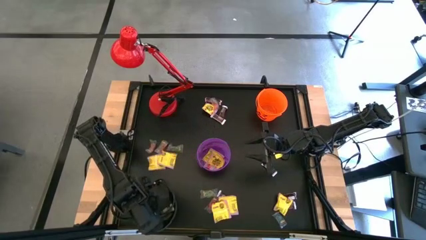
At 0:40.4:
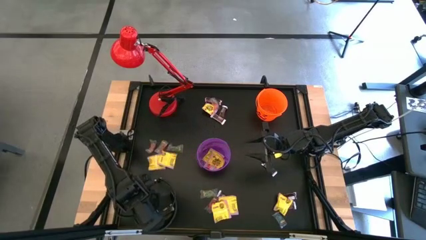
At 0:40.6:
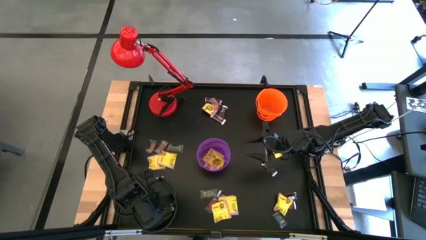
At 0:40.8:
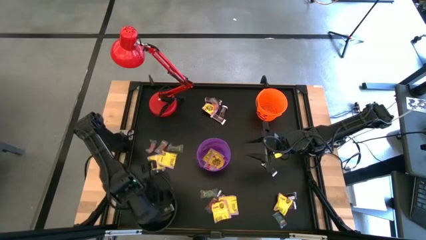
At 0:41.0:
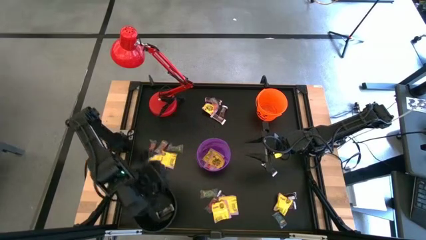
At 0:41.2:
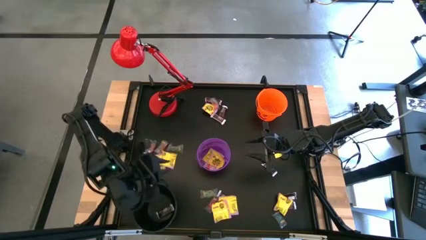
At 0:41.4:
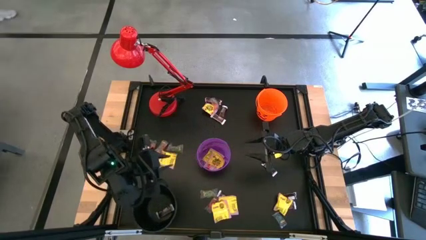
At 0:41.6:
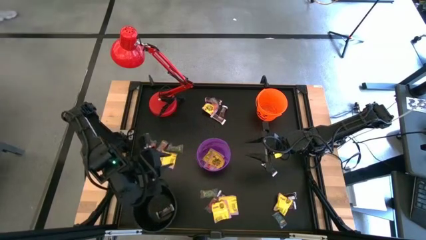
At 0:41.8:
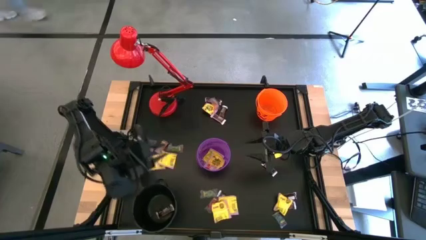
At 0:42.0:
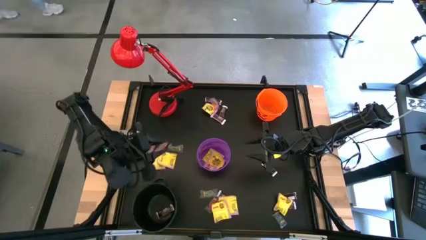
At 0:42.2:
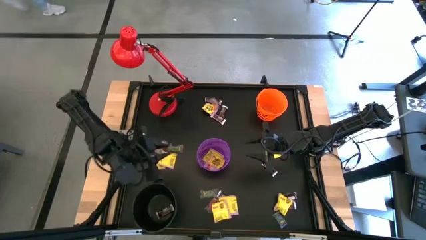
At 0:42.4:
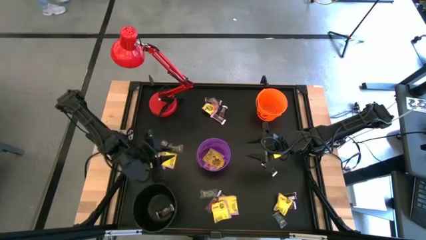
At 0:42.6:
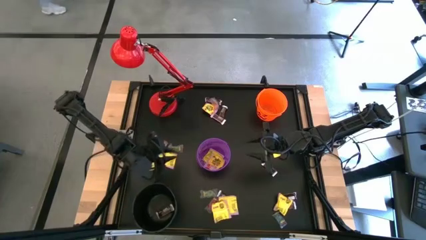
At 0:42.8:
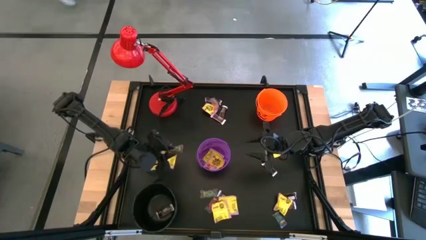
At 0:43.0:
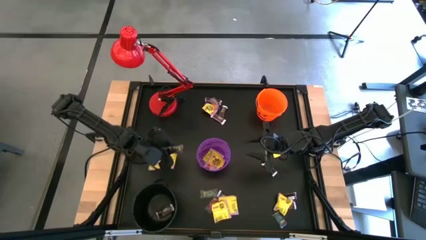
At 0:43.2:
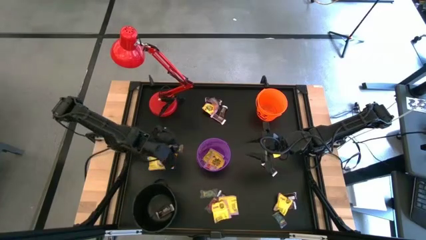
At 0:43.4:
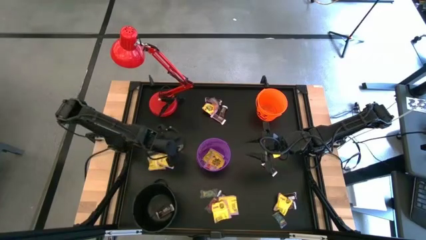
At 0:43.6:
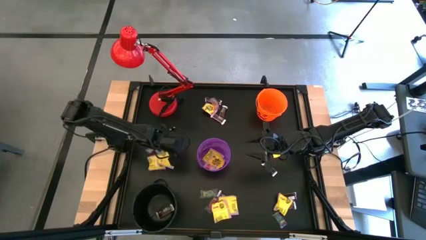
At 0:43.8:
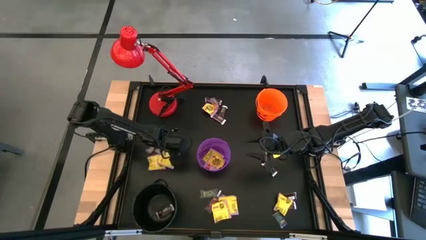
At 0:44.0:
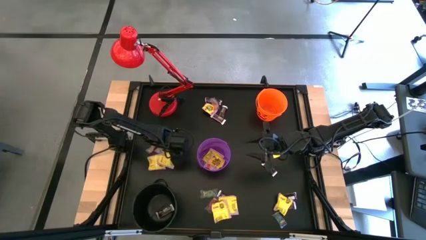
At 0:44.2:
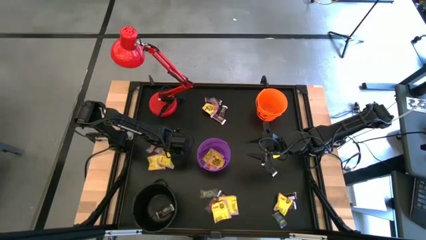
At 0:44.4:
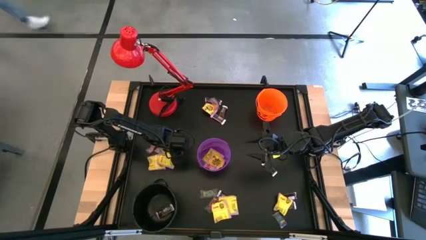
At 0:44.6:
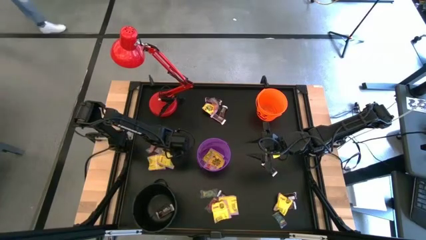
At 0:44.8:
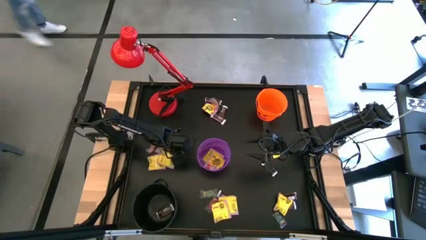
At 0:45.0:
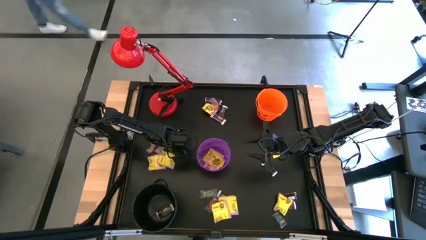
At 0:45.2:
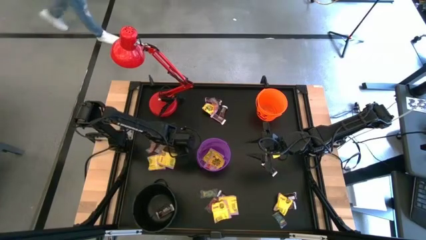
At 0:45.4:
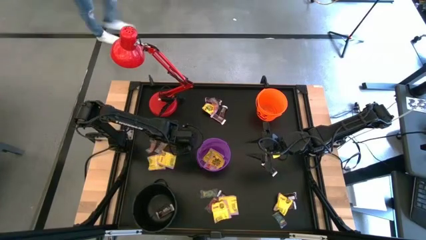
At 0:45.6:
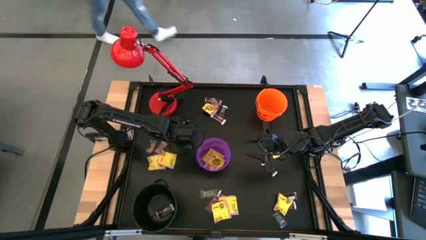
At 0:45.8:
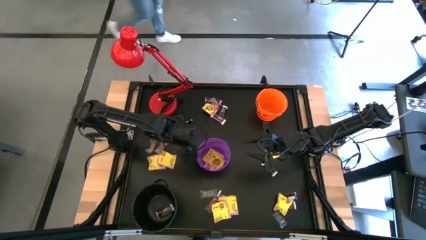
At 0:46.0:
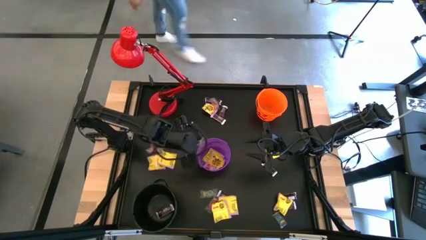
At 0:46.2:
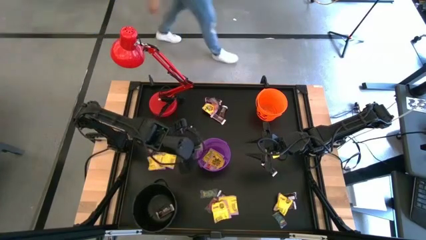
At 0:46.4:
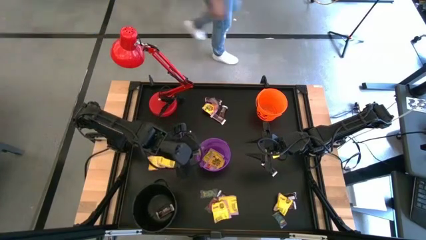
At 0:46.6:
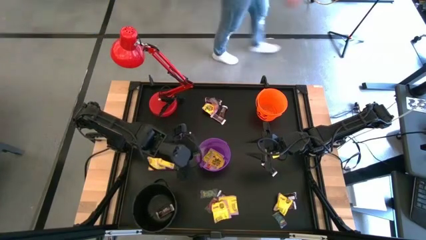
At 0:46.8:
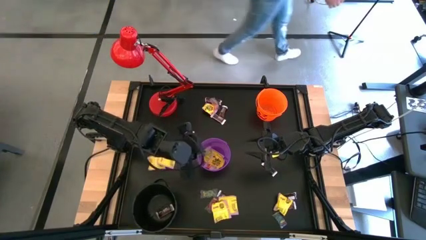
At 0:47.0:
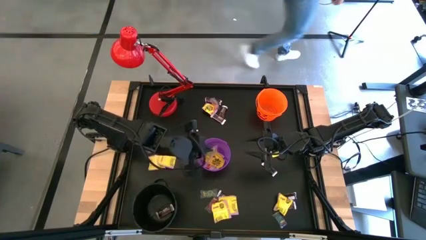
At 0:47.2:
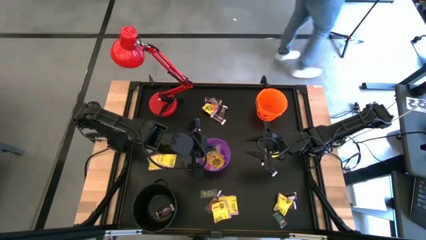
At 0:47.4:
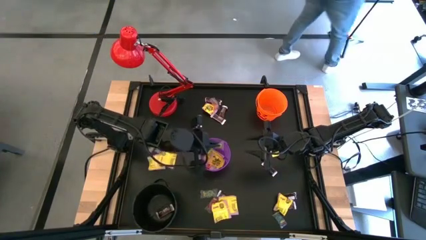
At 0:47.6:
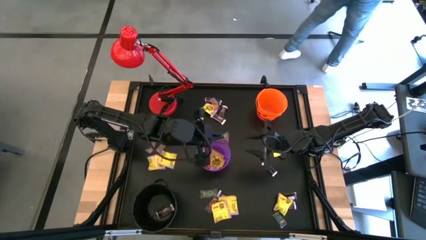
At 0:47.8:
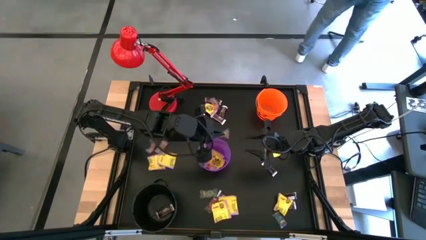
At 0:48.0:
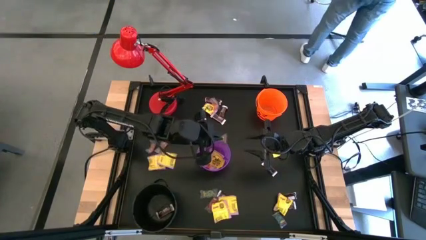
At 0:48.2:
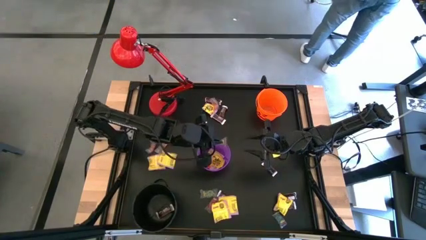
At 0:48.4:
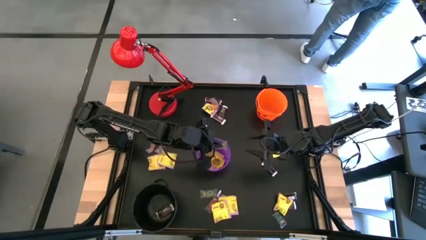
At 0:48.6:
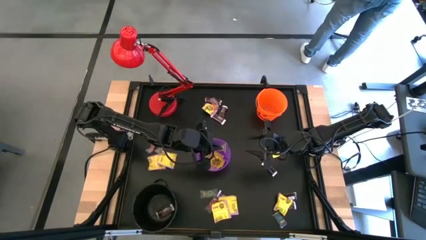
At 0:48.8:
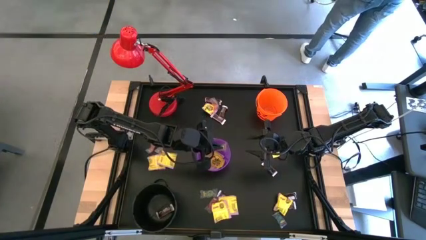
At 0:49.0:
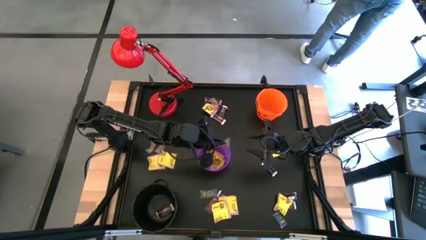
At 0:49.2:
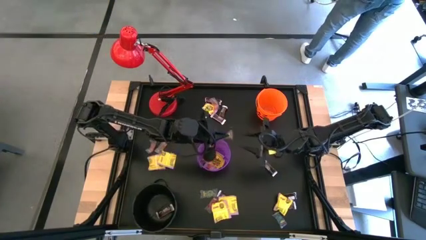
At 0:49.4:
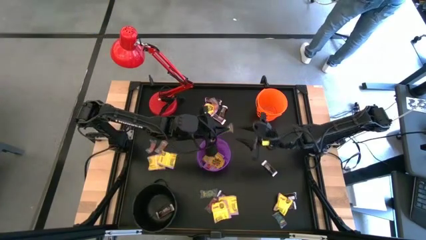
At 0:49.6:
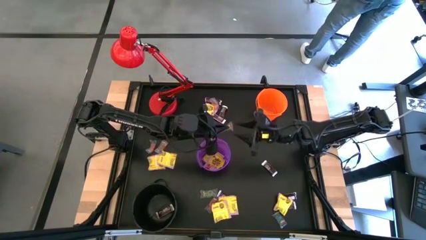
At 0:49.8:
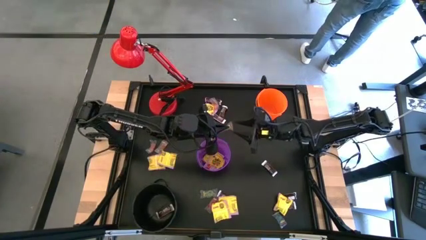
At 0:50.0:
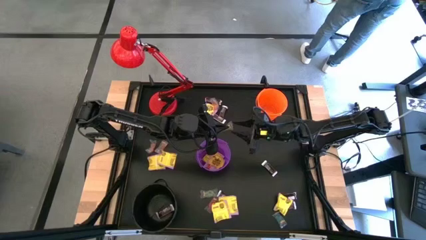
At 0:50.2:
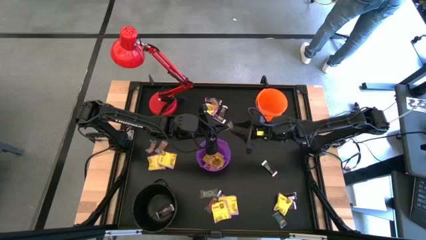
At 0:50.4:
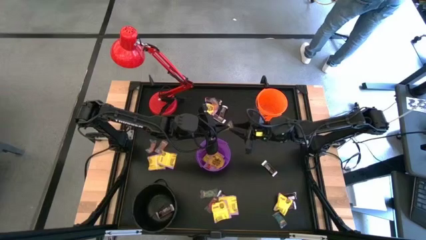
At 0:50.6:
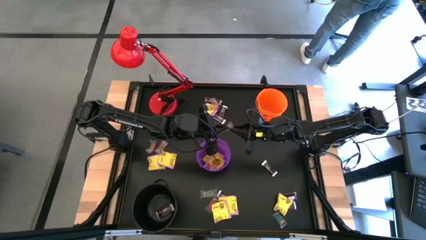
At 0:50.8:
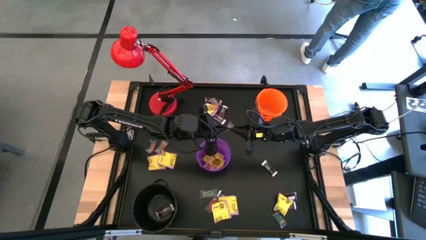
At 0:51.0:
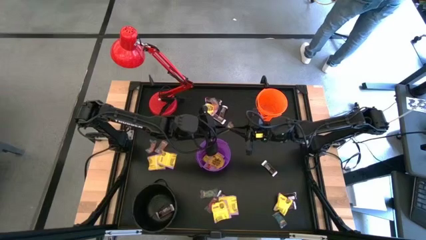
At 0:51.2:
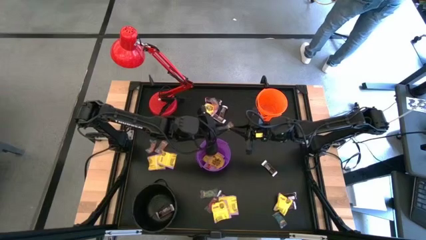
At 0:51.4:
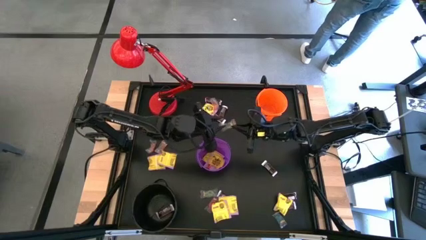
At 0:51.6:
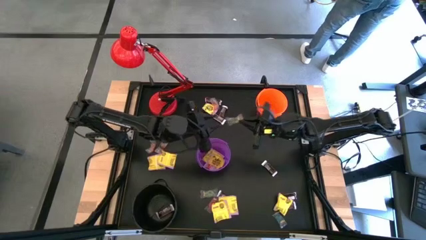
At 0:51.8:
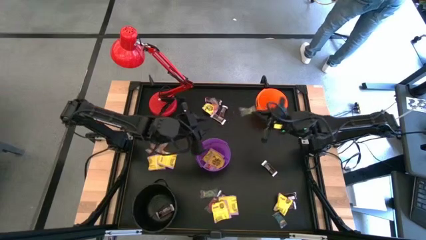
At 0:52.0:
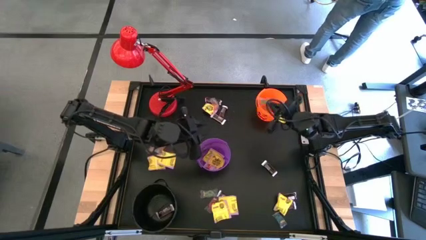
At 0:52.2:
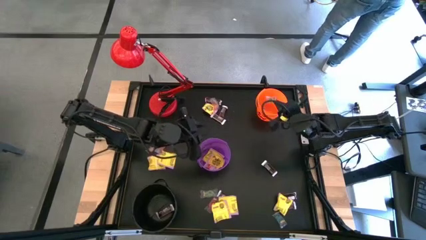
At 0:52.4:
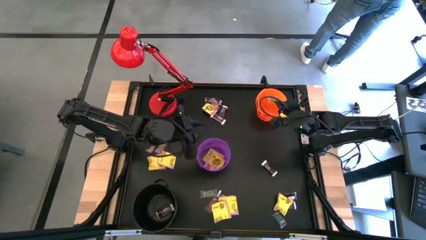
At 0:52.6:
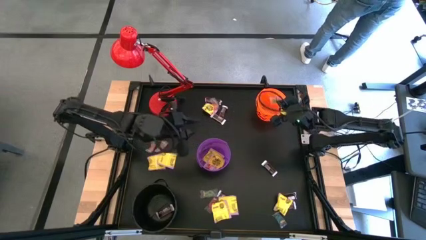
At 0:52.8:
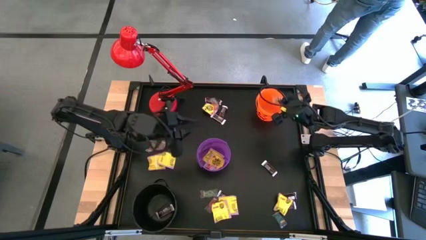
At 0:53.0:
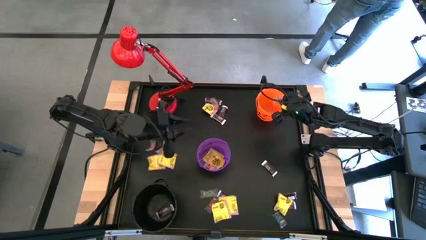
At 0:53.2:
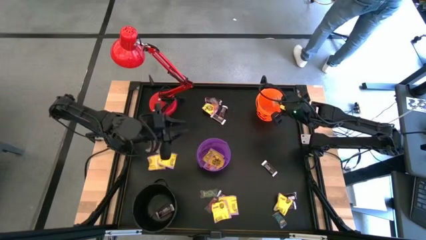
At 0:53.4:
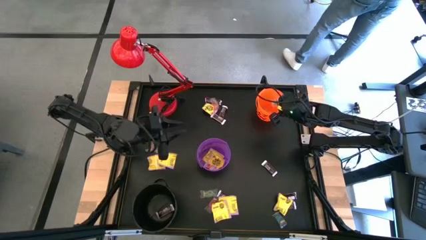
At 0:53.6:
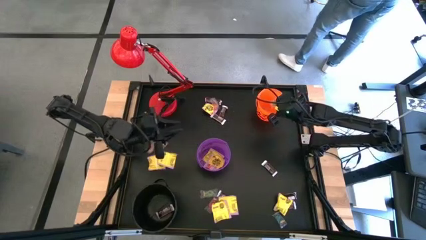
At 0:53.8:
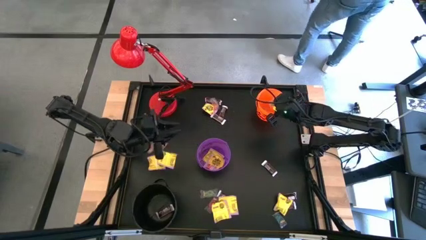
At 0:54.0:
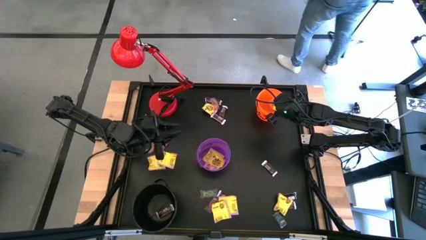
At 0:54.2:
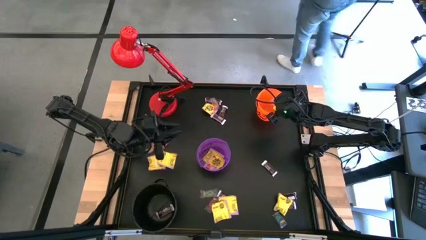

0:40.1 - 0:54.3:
Task: Sort candy
Put the green gummy into the orange bucket
